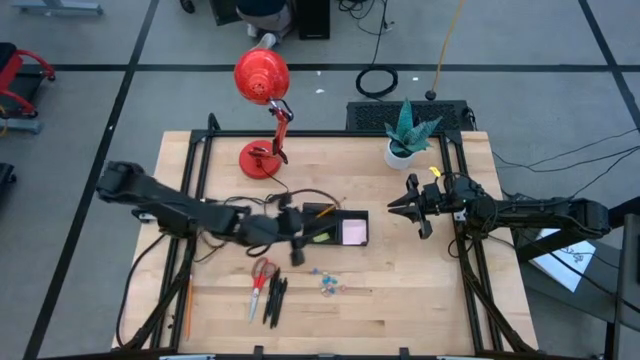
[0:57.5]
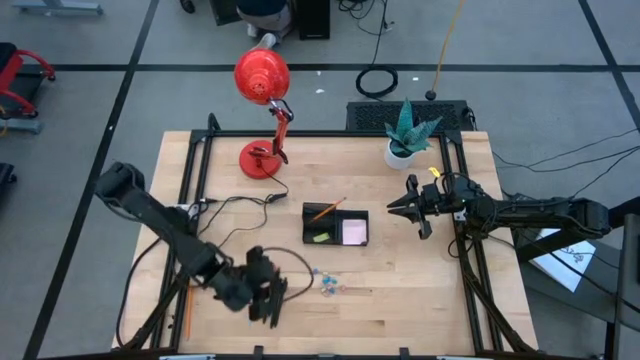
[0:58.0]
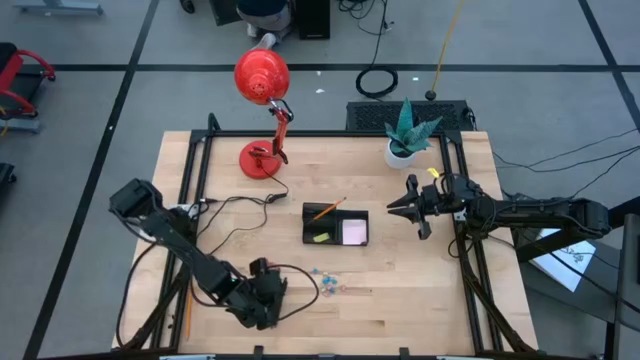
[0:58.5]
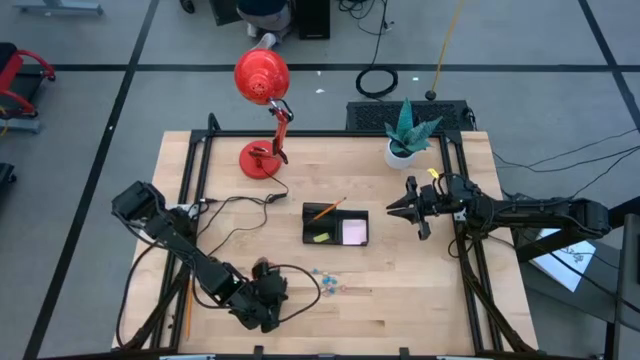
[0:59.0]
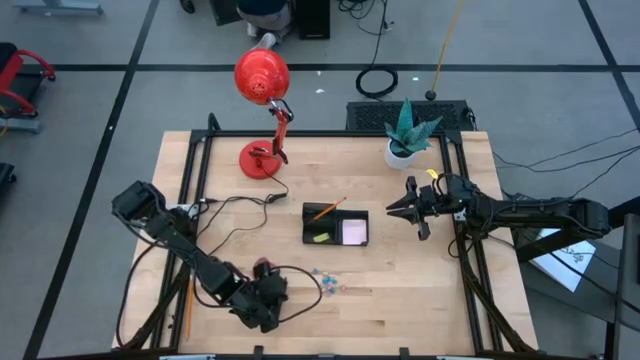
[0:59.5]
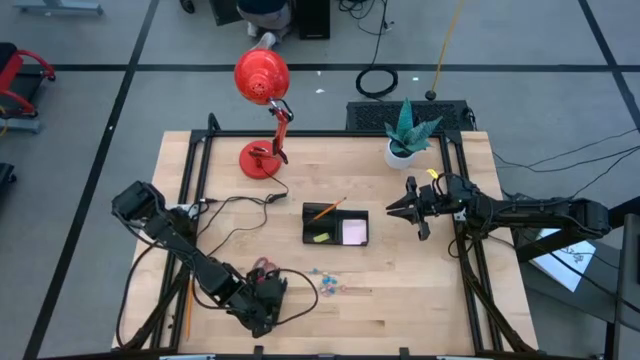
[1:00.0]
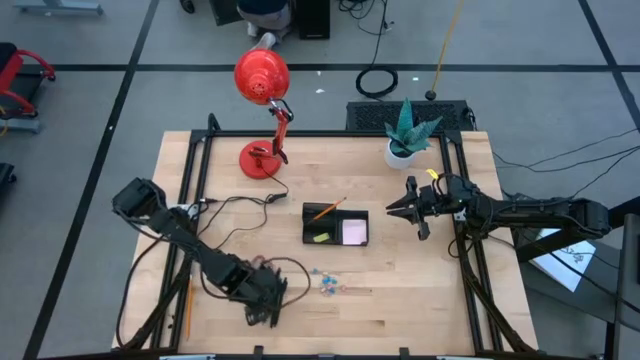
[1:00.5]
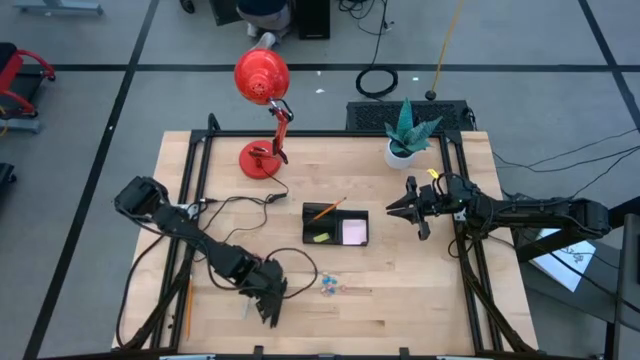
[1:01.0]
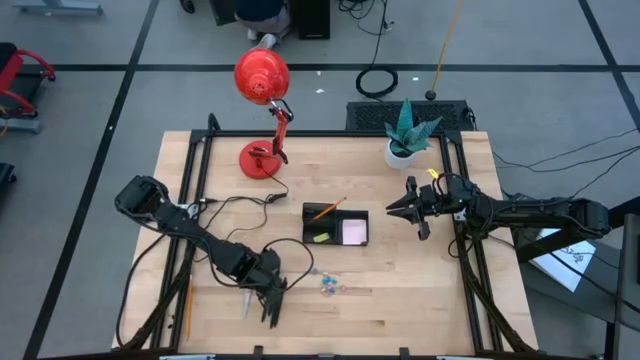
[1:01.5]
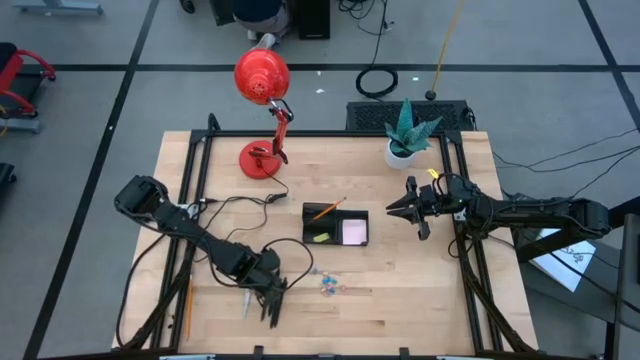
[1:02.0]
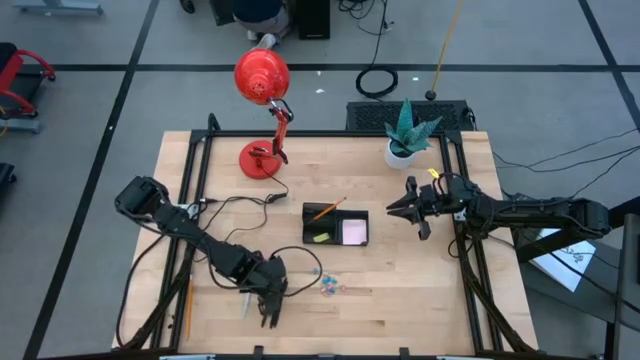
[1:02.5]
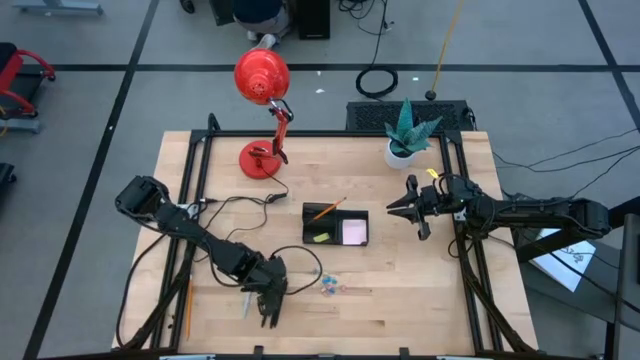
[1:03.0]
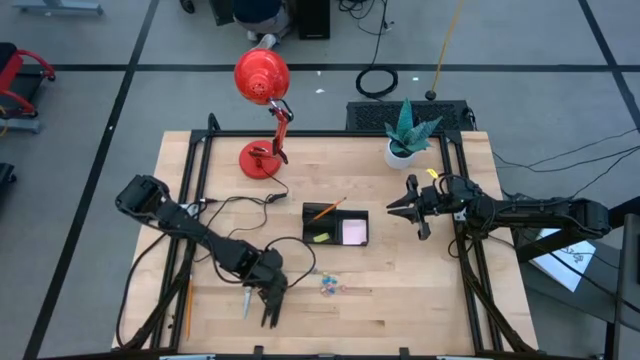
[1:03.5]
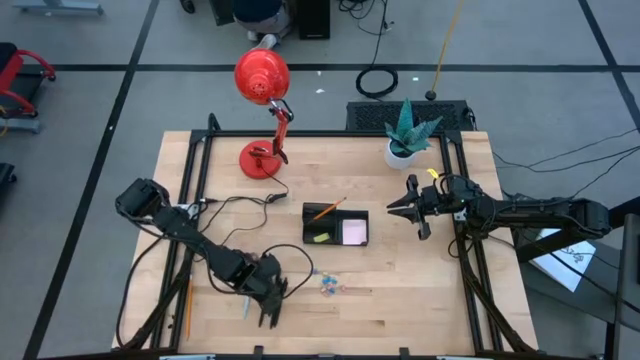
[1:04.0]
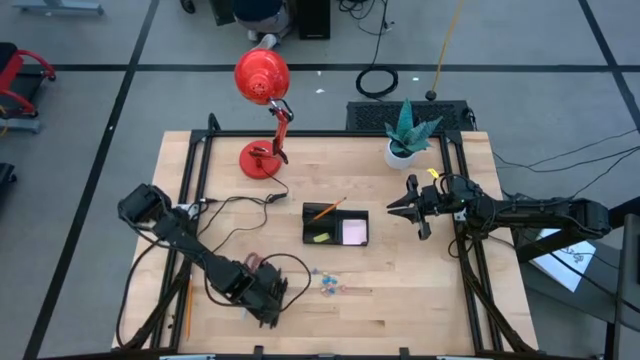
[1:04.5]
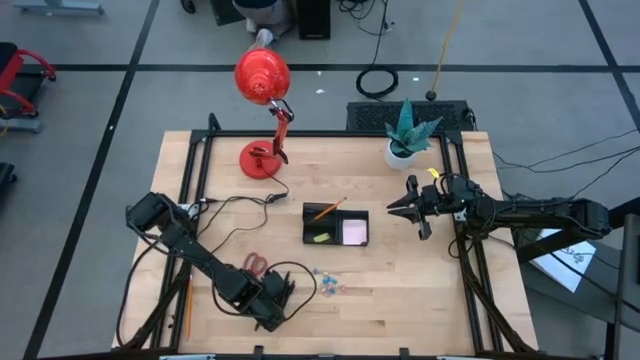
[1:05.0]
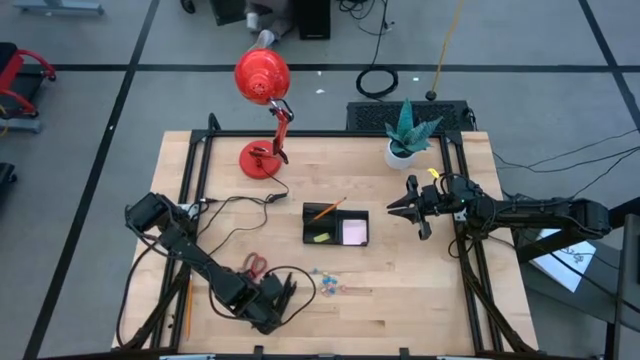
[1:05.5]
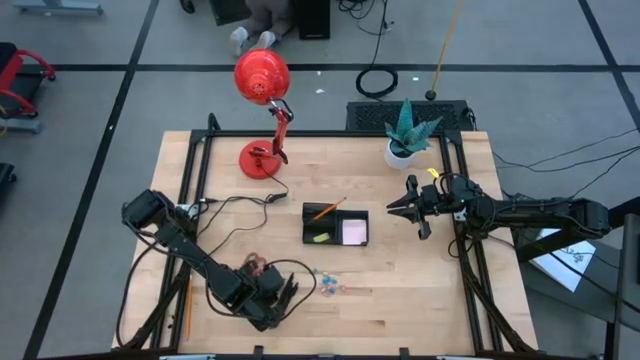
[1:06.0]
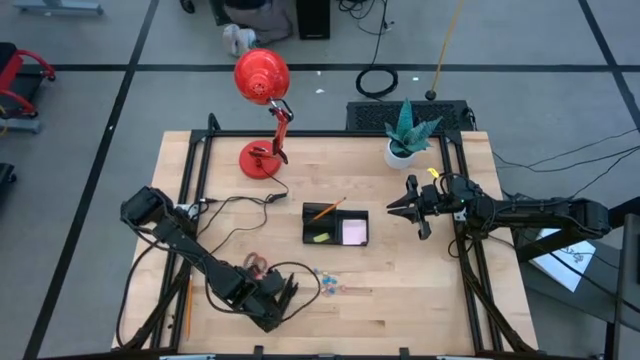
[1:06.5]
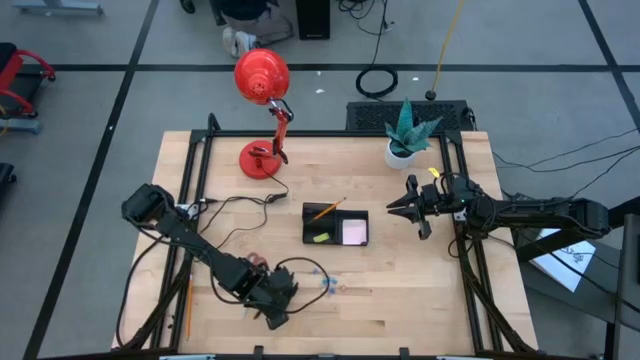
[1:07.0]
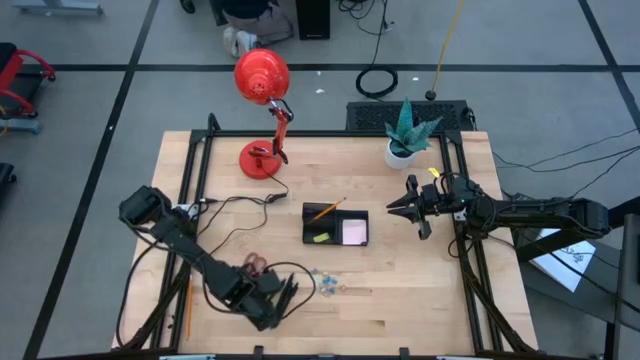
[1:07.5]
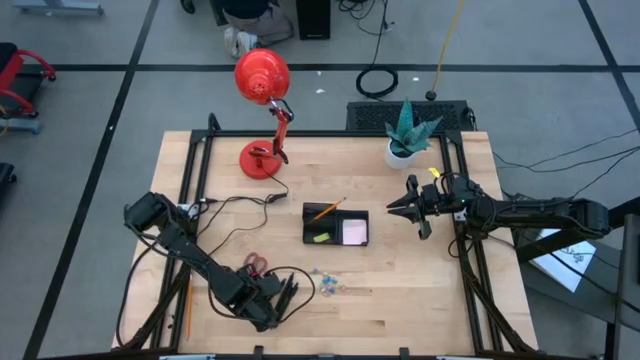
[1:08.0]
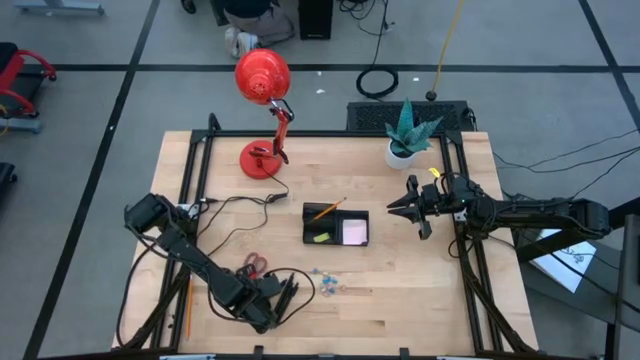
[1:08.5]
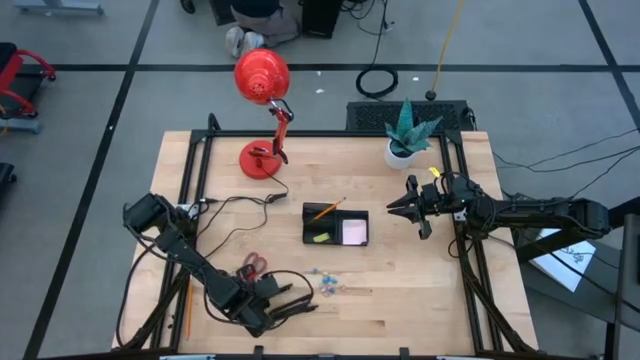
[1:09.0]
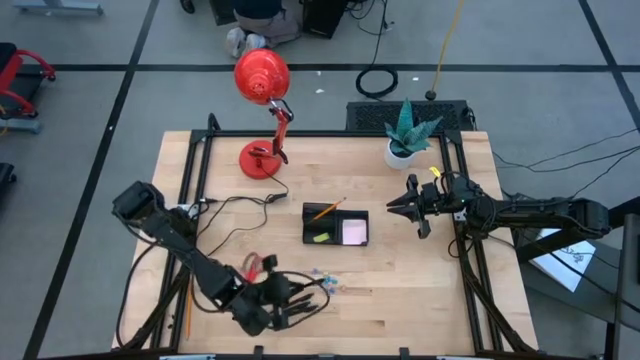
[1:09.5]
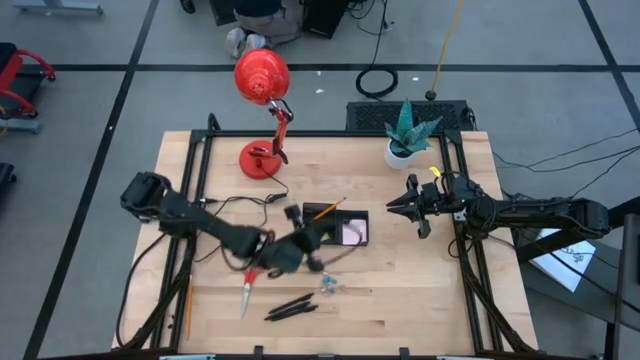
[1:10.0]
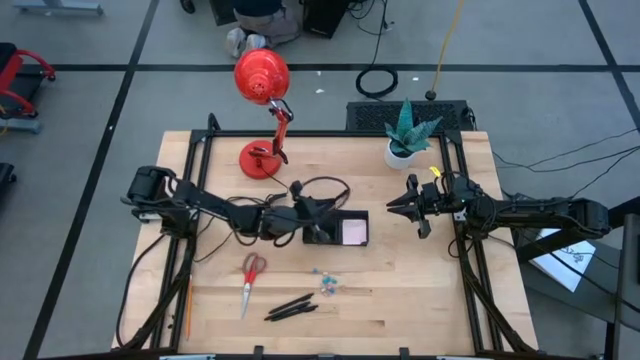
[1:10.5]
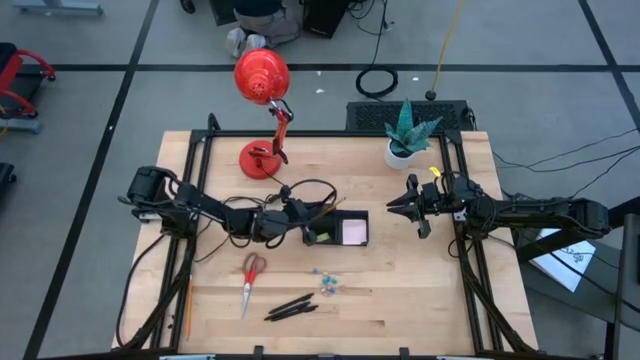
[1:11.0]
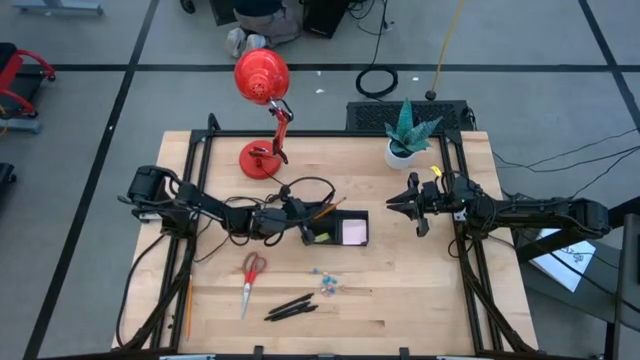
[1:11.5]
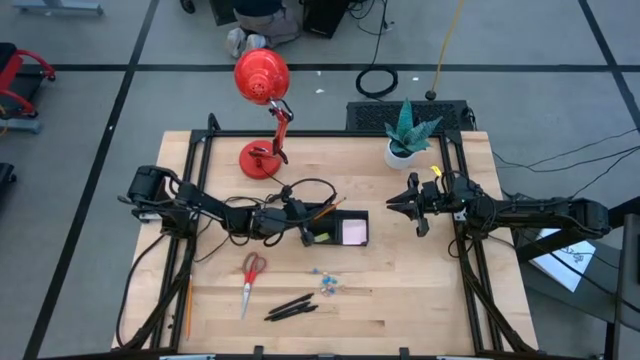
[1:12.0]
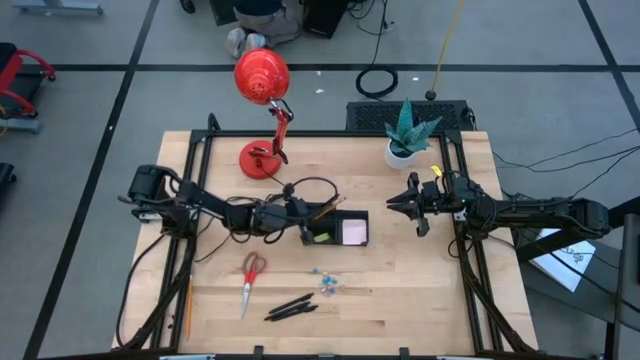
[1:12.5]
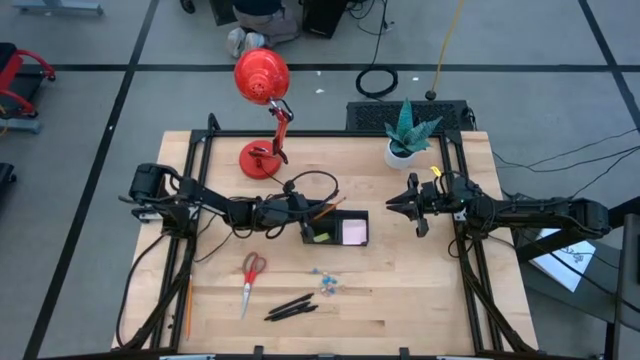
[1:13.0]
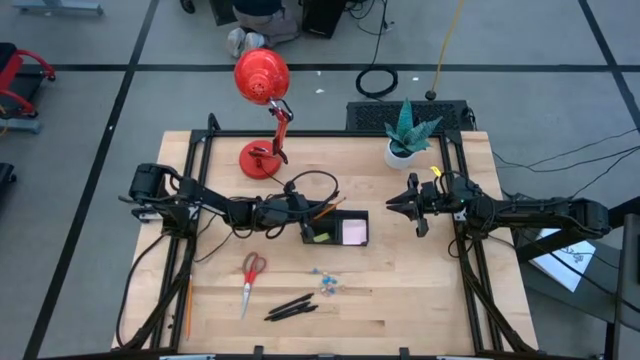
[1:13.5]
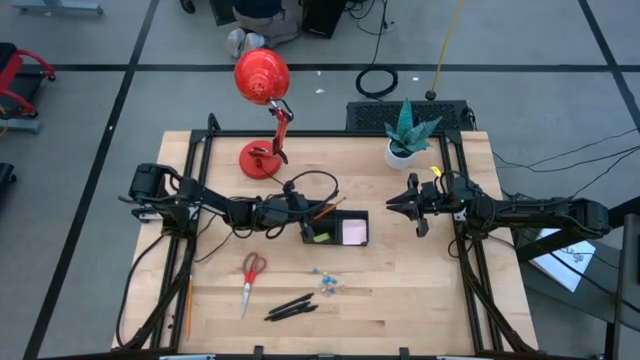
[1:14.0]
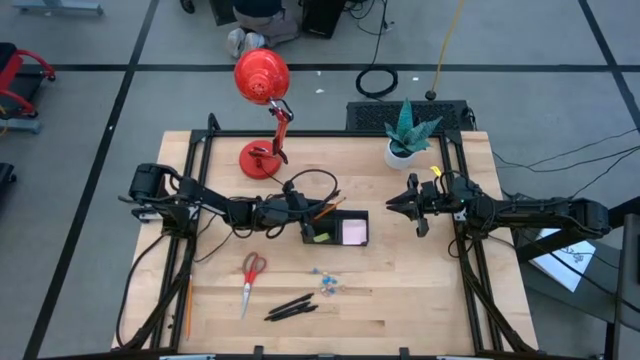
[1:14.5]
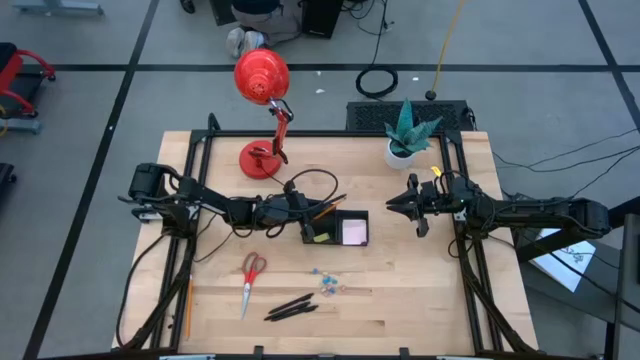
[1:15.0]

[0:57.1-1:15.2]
Task: Pick and place office supplies into organizer
Put the black pen into the black desk organizer

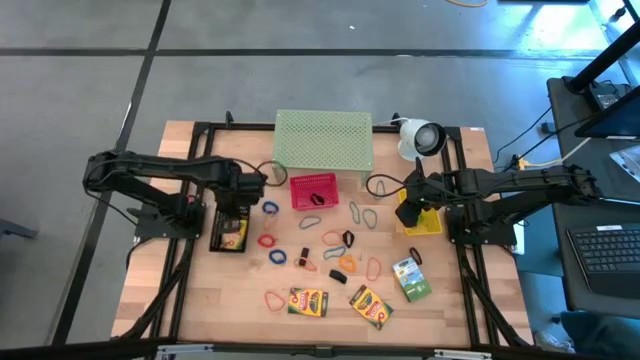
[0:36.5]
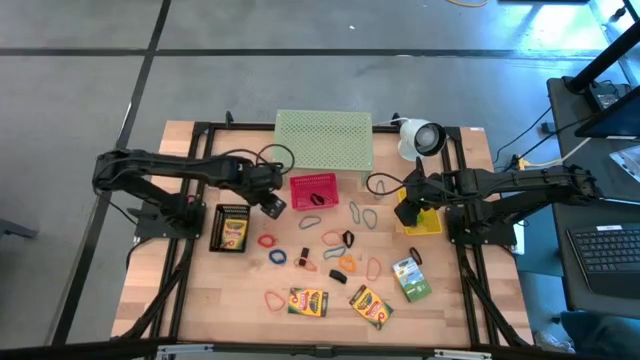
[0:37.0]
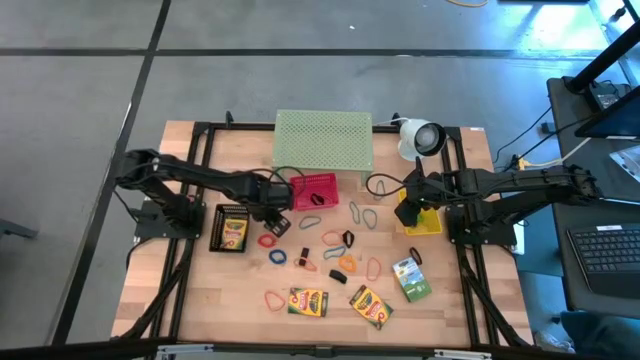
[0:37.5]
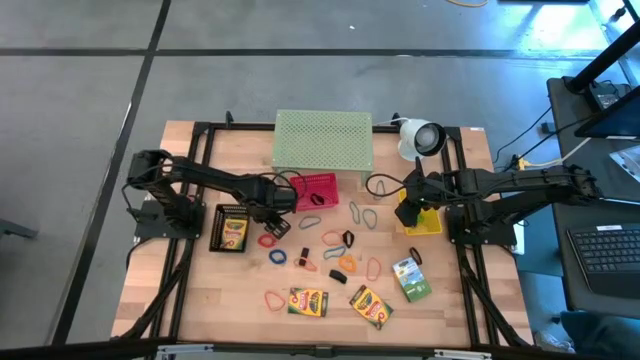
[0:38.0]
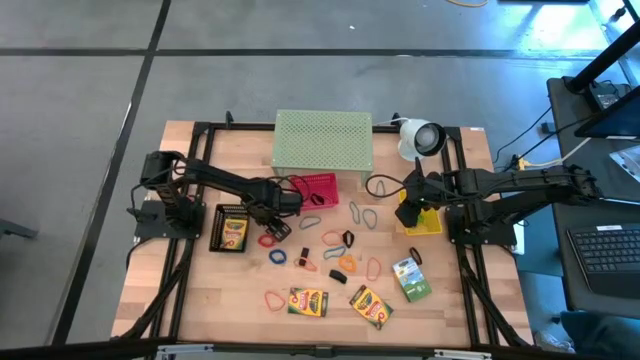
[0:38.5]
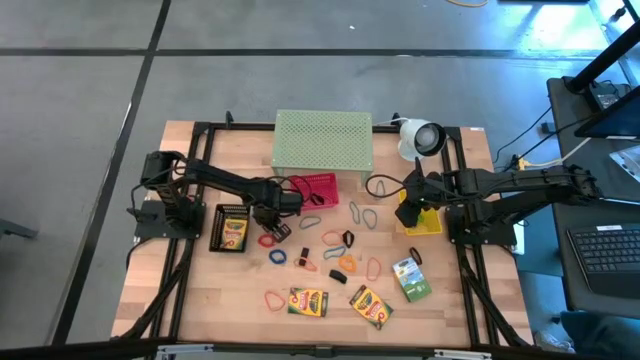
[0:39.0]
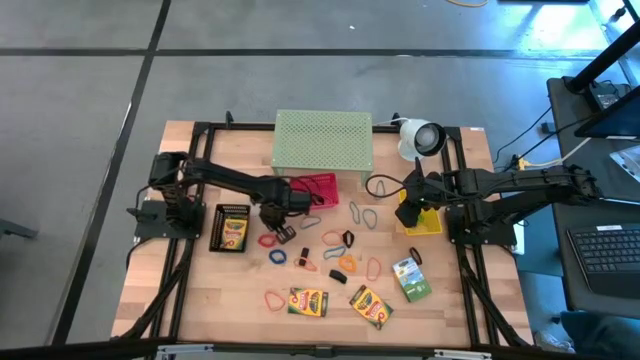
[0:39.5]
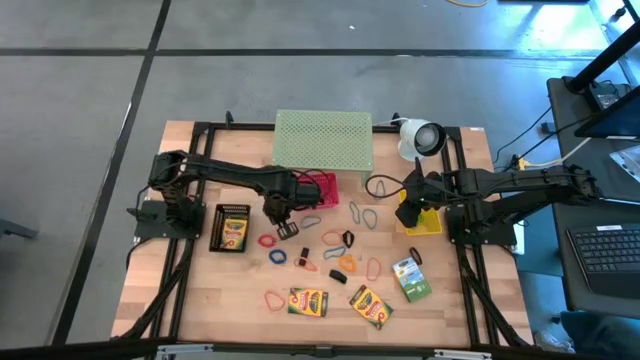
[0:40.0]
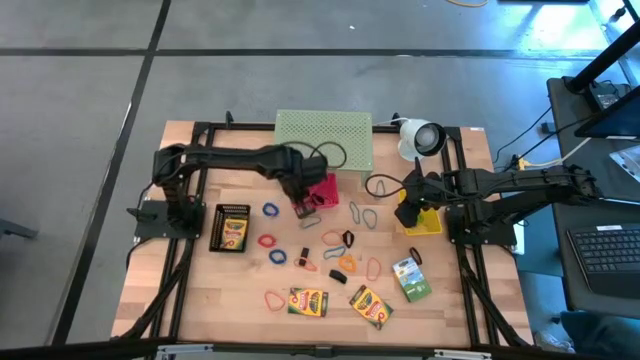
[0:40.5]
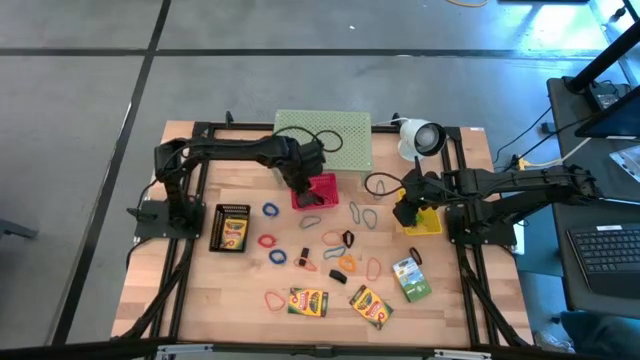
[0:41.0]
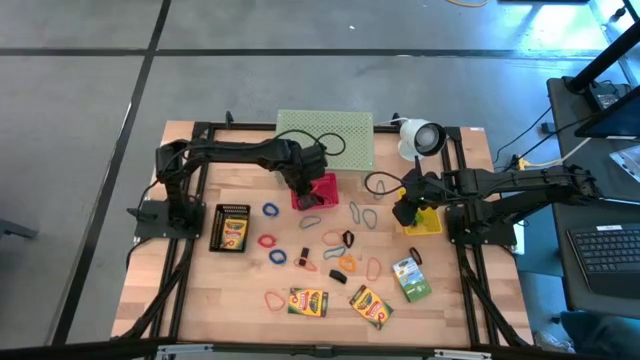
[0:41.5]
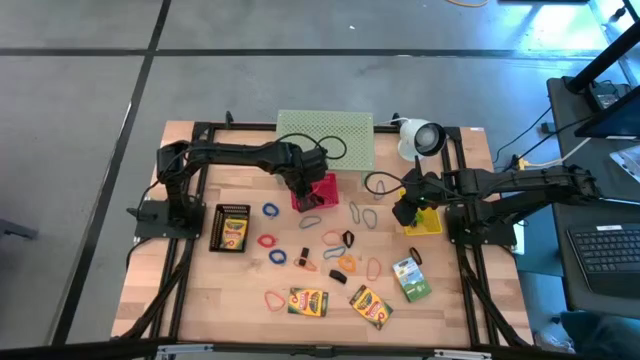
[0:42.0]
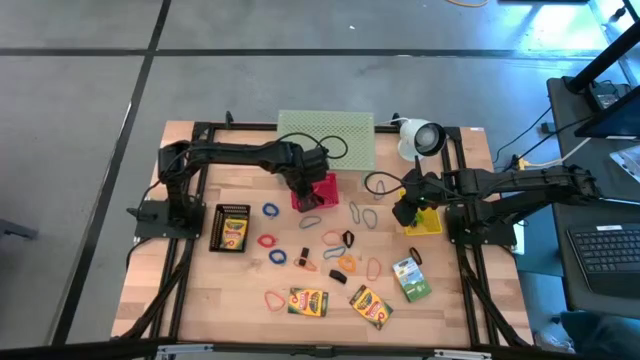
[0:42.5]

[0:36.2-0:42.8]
Task: Pick & Place Office Desk Supplies
Put the orange rubber band into the red bin
